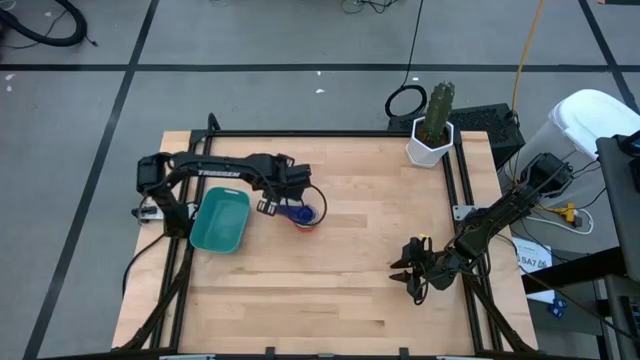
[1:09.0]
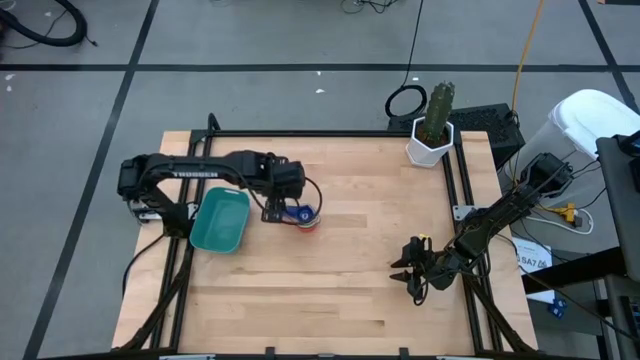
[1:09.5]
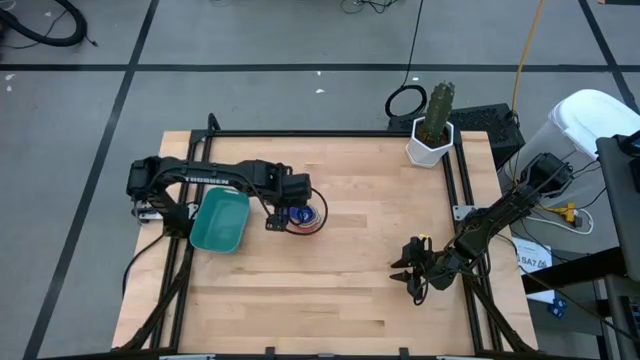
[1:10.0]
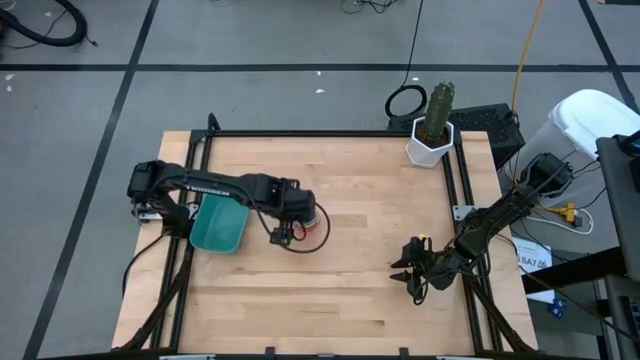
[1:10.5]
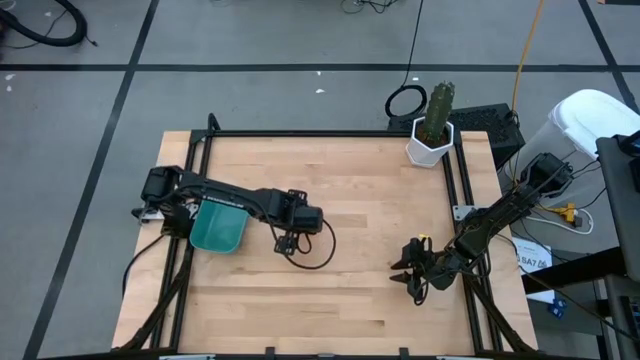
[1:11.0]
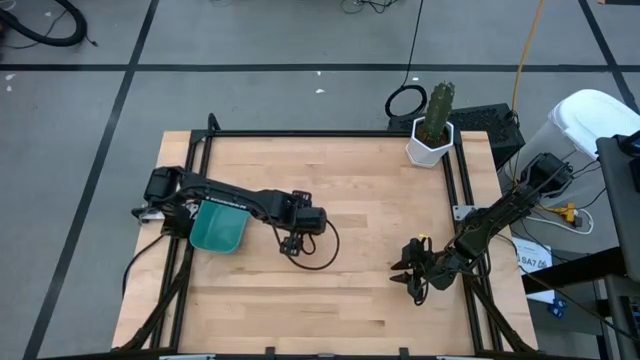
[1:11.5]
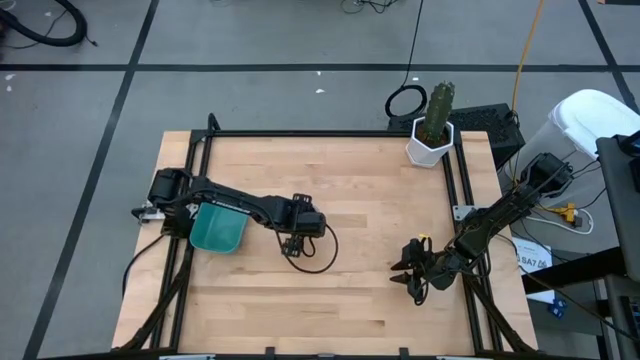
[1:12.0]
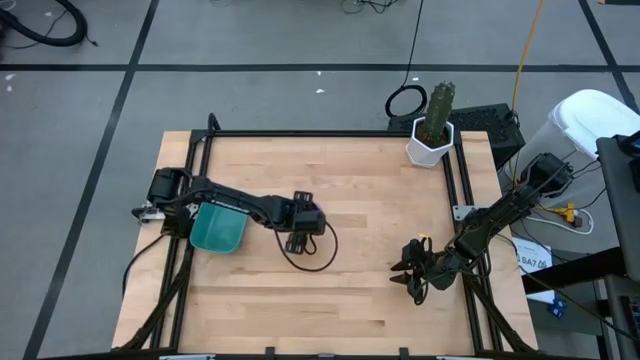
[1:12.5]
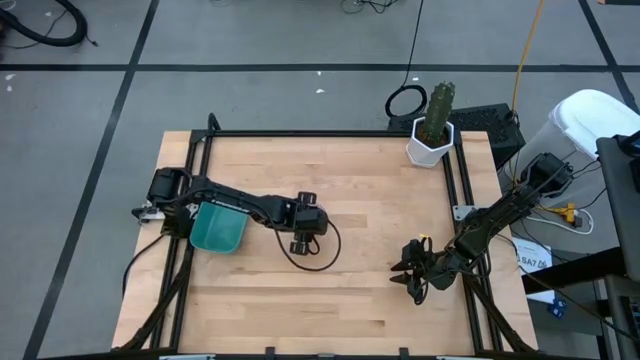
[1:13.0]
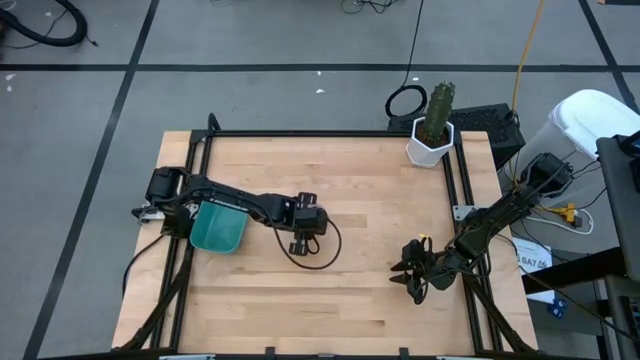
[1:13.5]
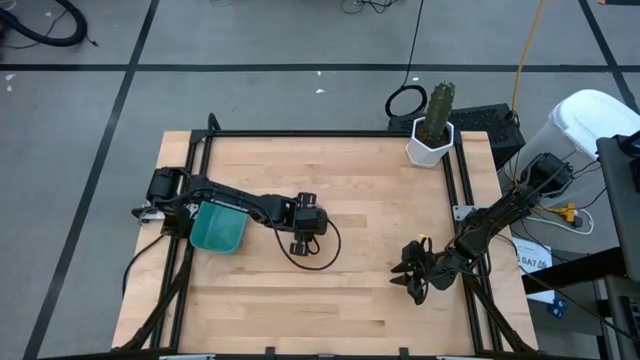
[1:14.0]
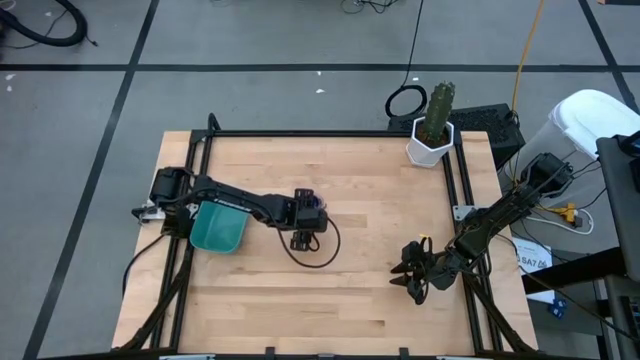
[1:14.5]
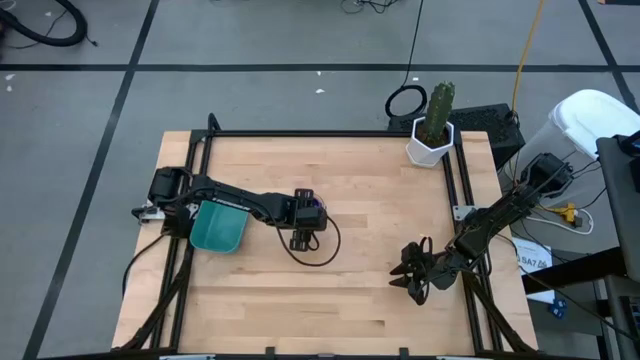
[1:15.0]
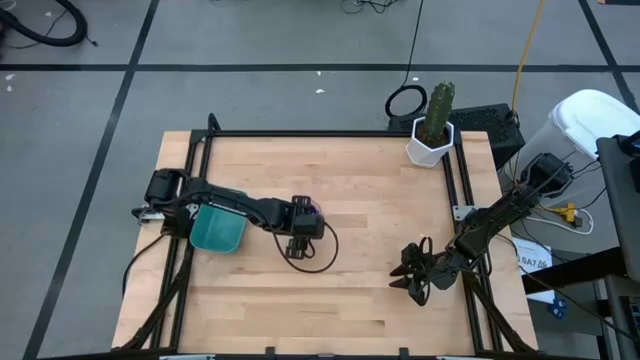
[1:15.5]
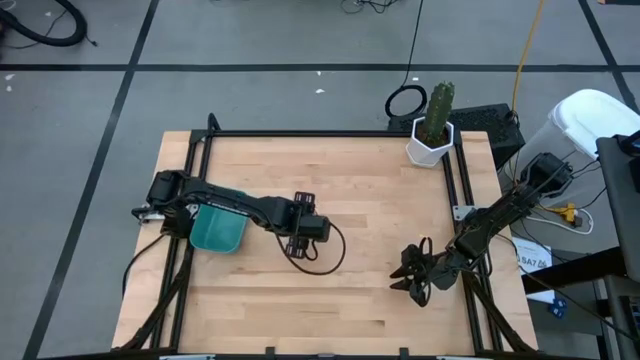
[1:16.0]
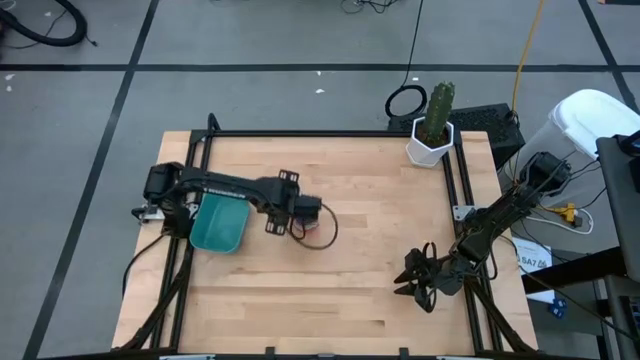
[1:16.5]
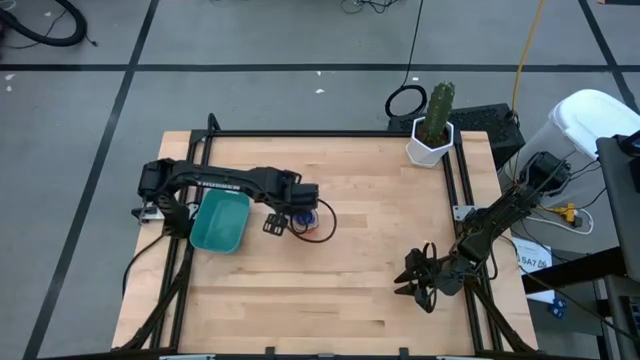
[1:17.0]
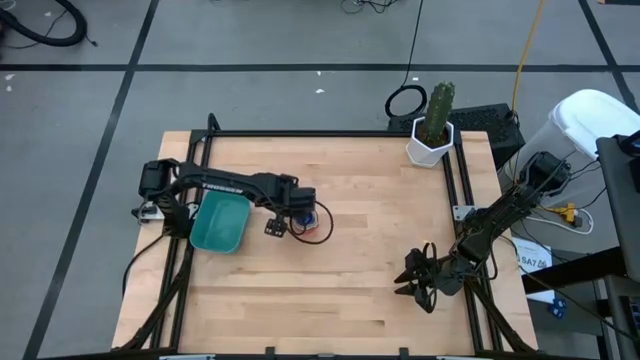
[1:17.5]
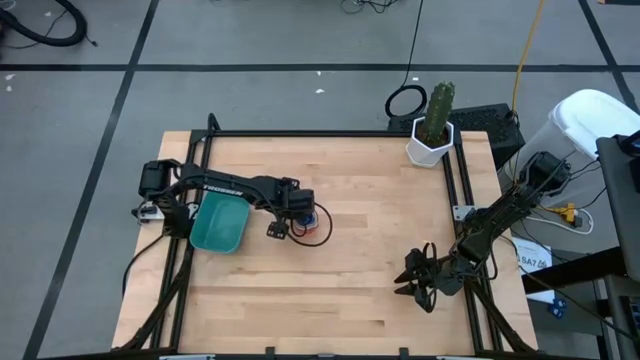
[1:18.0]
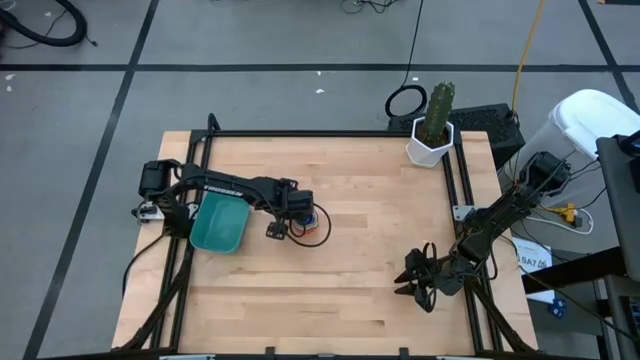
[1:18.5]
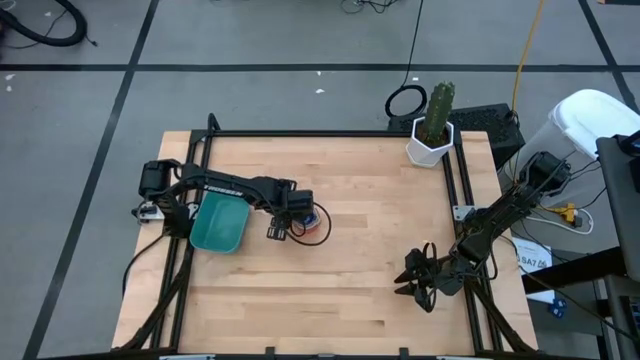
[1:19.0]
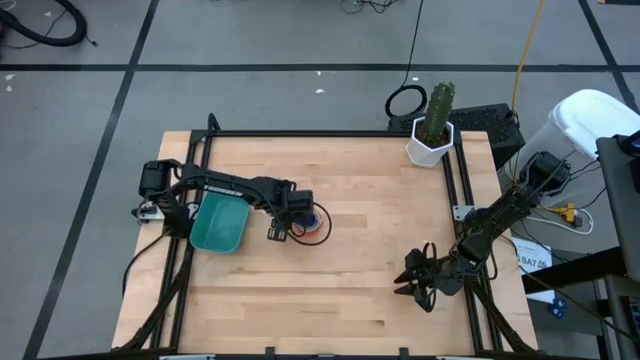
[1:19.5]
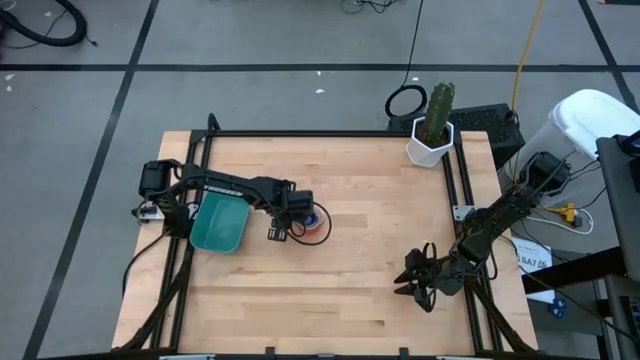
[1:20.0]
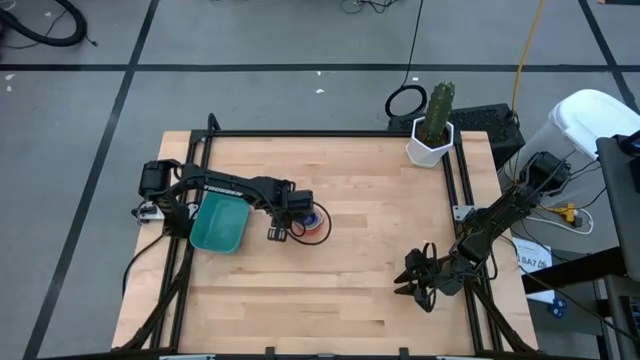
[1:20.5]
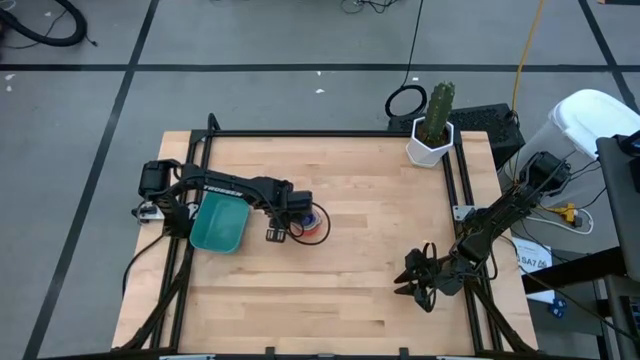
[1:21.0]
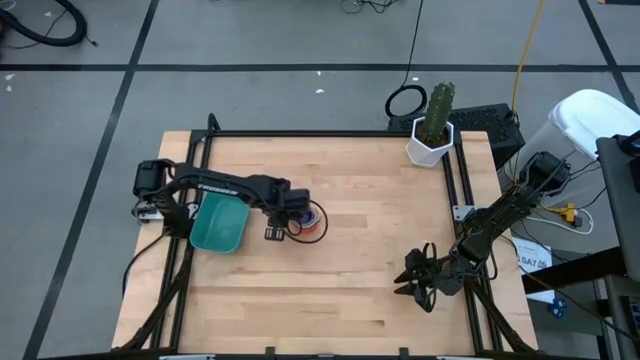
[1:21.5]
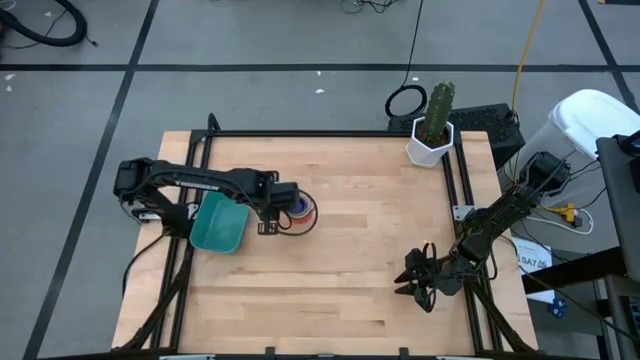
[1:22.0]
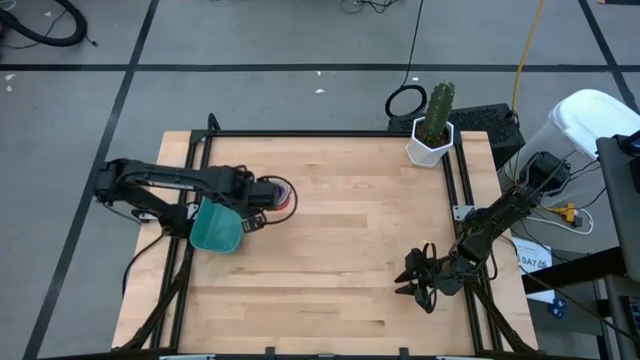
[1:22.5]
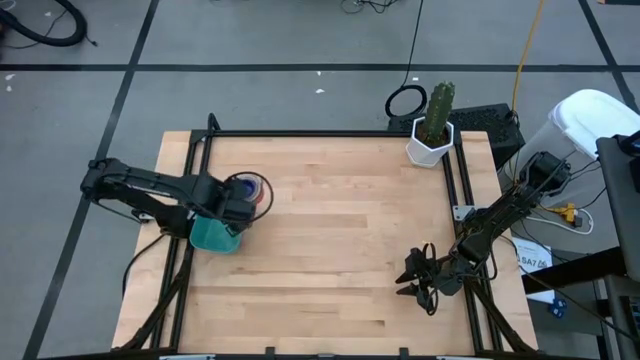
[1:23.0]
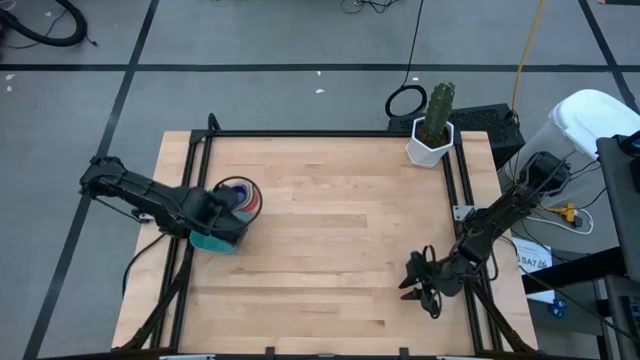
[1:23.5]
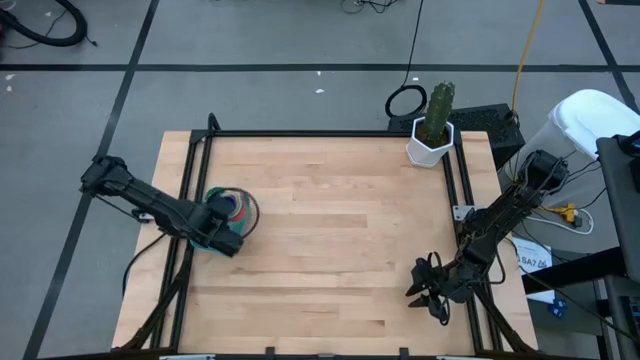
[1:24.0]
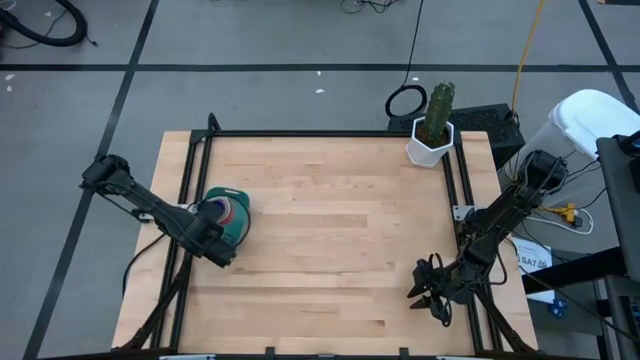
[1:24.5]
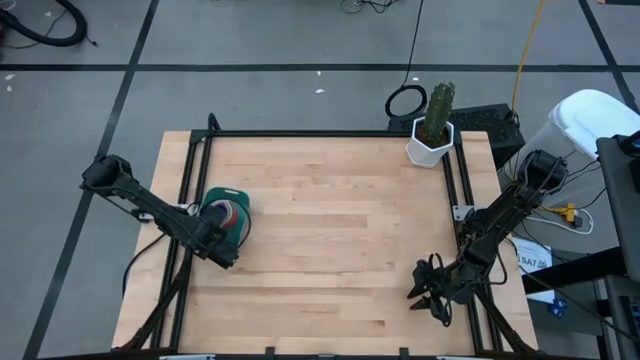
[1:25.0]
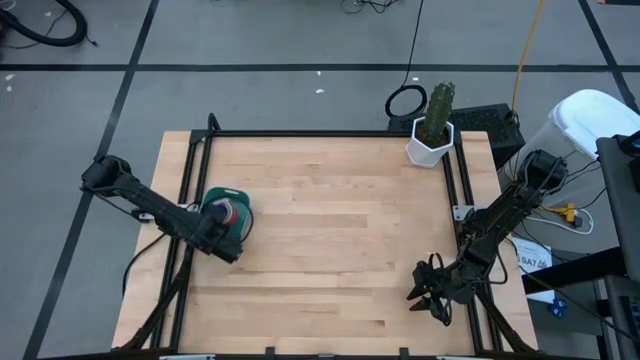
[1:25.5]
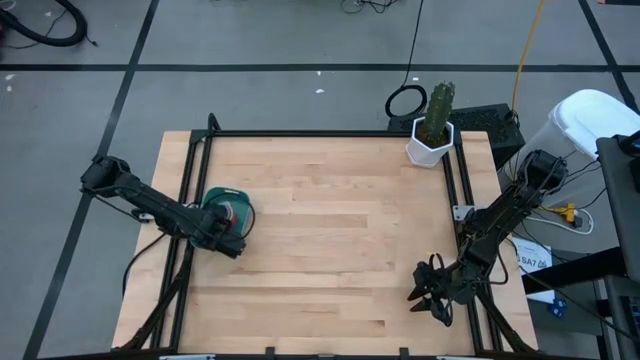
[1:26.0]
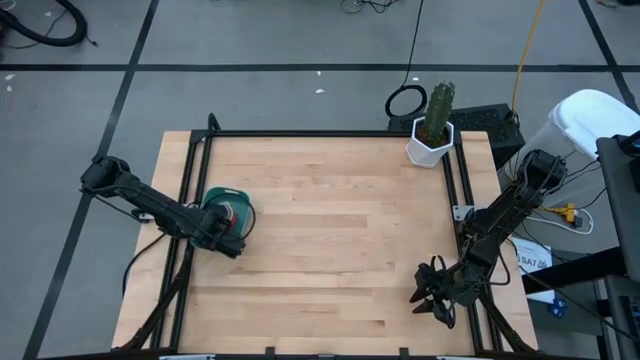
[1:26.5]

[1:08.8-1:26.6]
Task: Nest measuring cups in basket
Put the nested measuring cups into the green bin

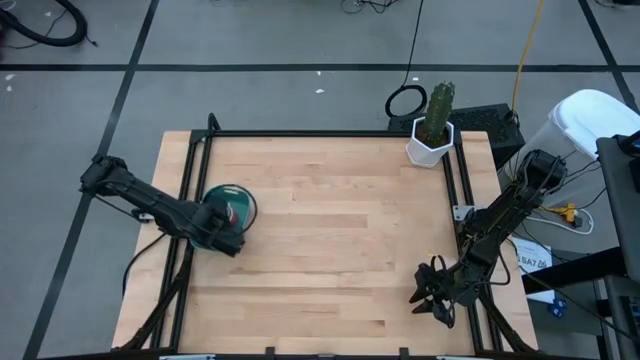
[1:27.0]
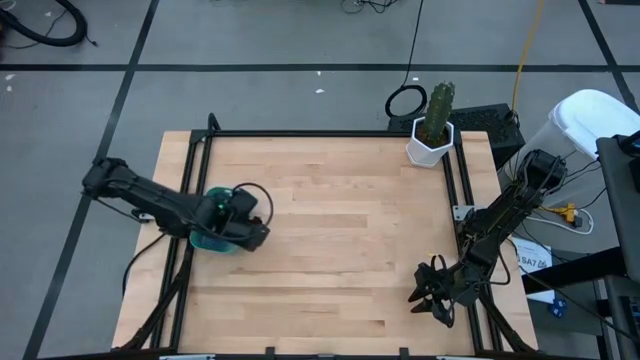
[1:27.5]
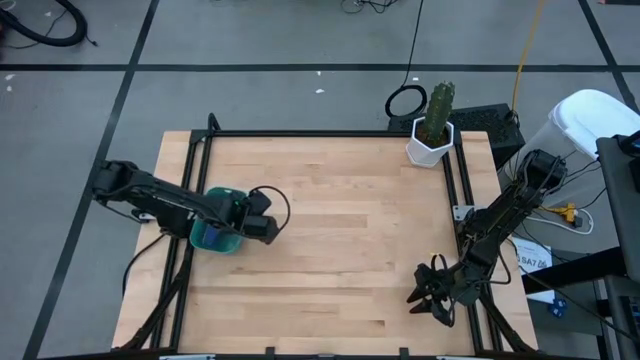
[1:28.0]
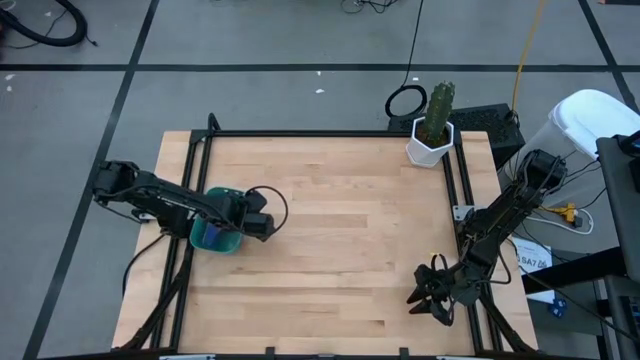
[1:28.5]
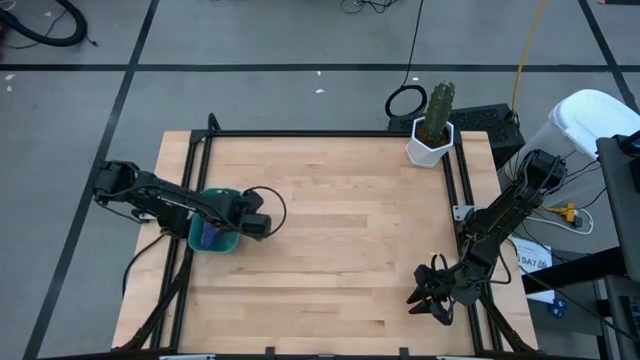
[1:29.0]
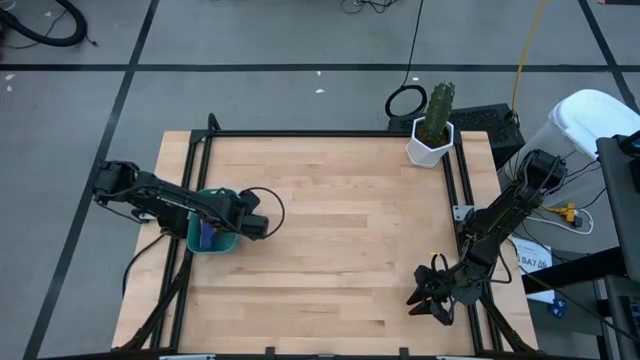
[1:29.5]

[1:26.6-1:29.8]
Adjust the green bin
